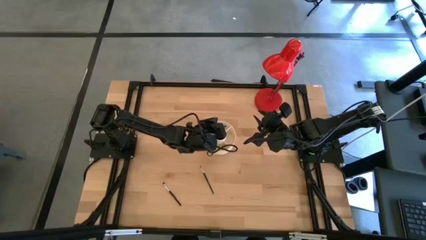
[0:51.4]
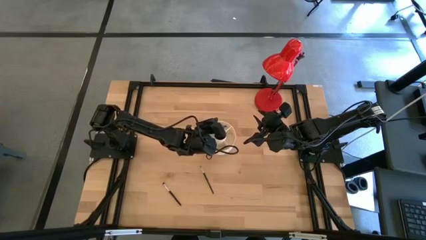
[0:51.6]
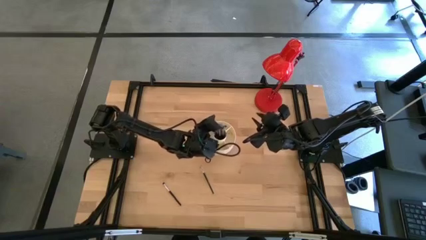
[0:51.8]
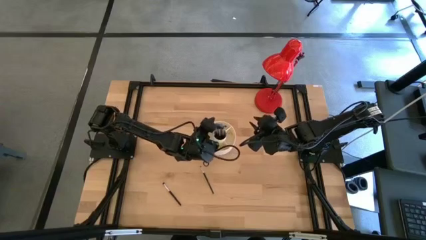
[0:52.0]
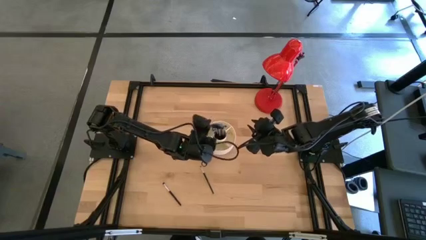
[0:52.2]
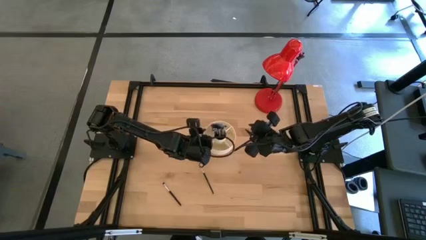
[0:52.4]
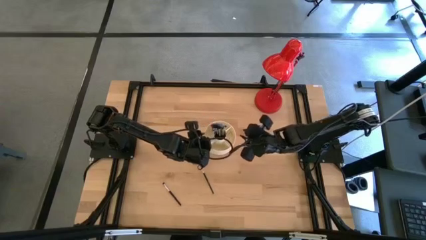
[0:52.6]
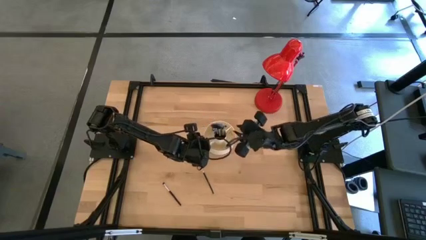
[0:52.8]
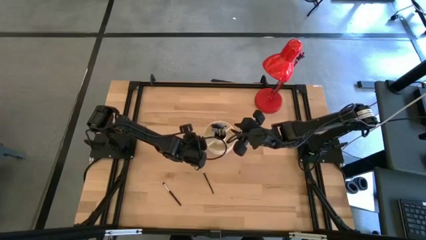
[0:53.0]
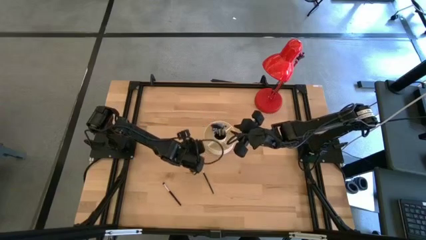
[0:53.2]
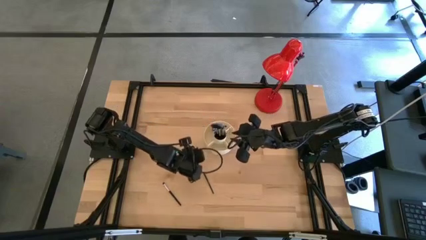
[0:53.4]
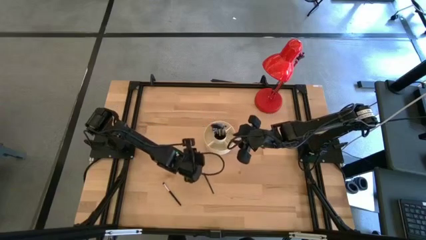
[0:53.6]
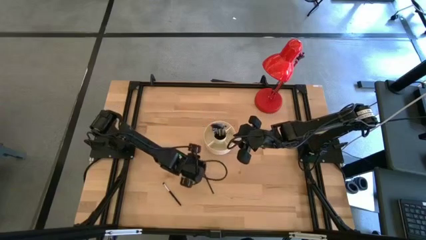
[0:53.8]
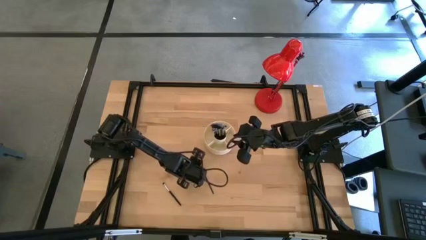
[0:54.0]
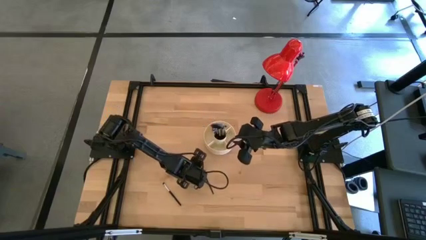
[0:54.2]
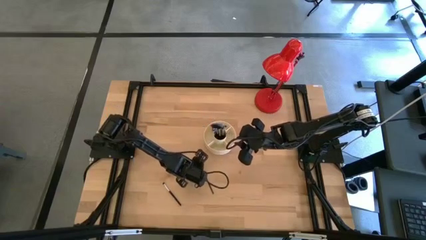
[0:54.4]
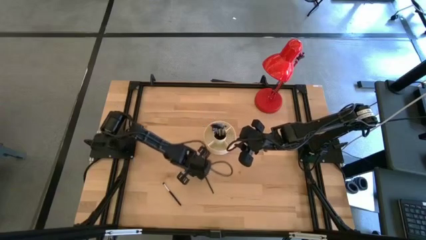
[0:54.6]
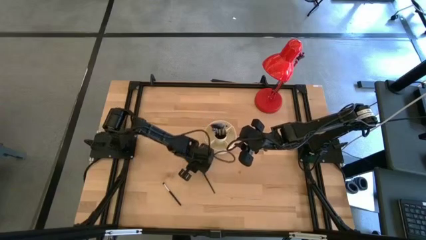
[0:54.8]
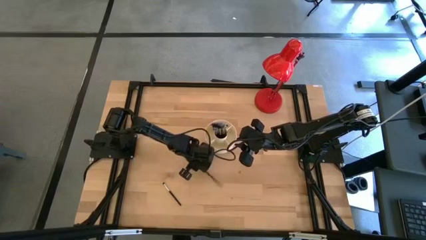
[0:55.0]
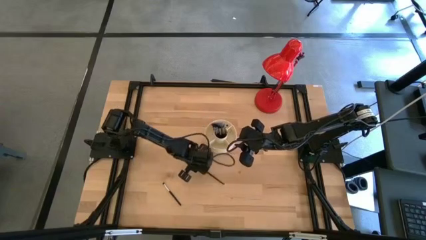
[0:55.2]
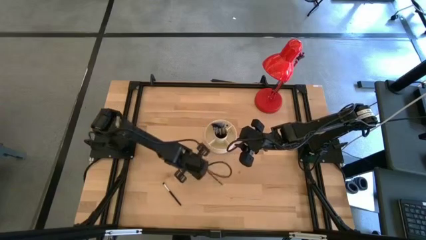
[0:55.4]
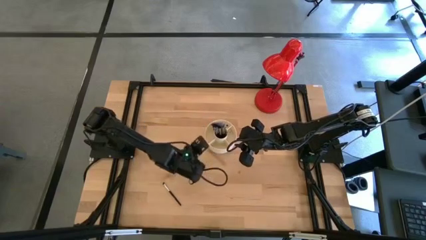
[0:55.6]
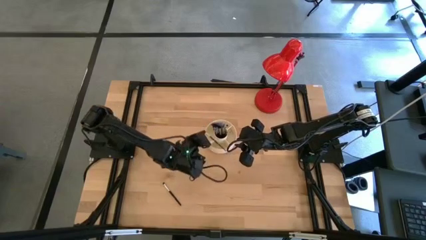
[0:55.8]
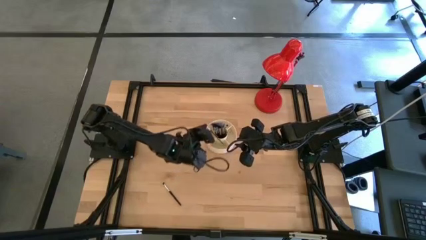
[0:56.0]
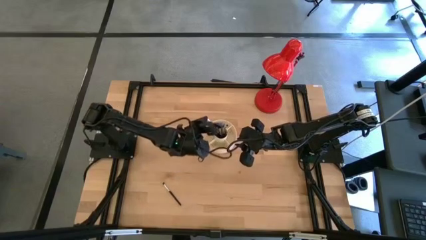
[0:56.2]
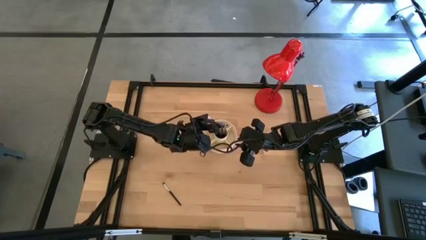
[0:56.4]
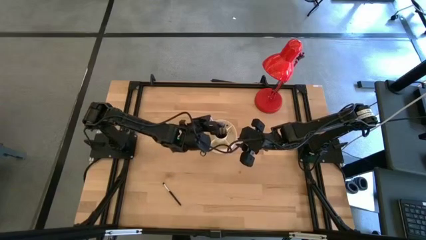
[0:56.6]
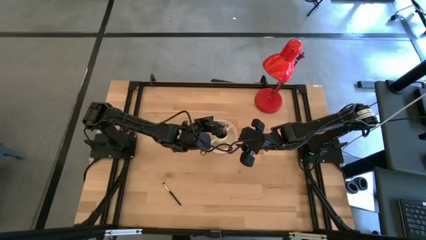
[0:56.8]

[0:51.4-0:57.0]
Task: Put items in baskets/containers
Put the eyeshadow brush into the brush organizer

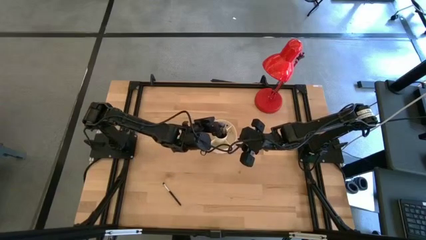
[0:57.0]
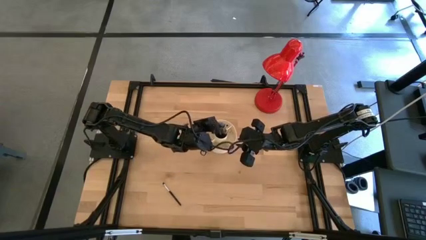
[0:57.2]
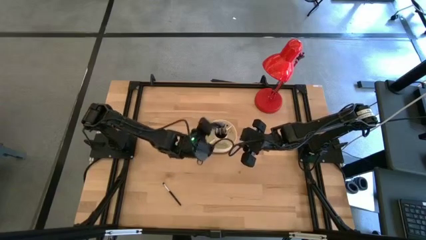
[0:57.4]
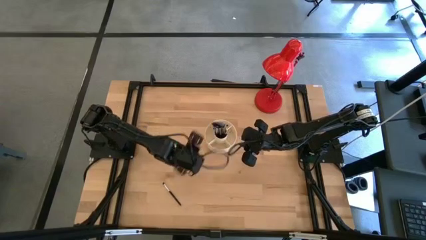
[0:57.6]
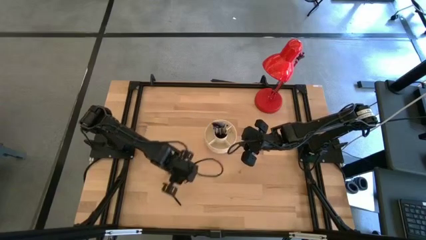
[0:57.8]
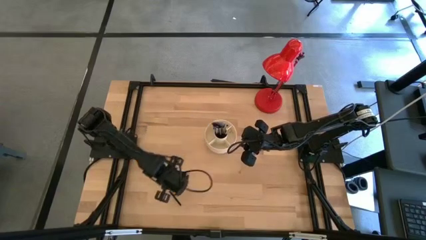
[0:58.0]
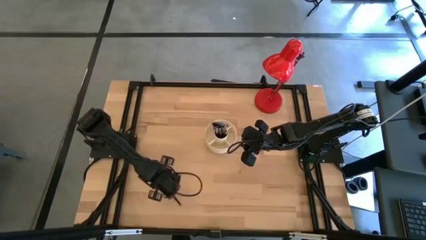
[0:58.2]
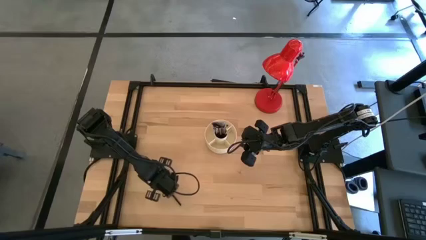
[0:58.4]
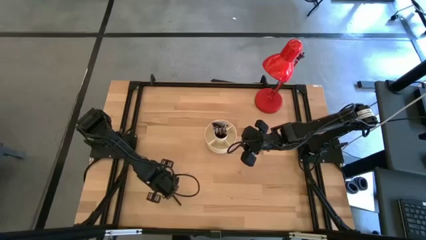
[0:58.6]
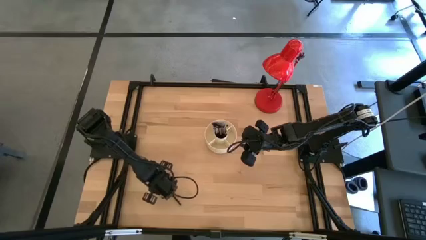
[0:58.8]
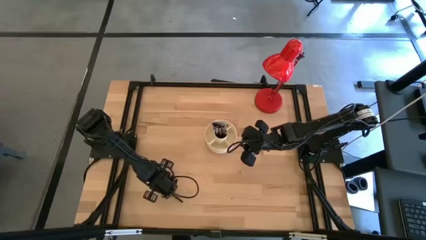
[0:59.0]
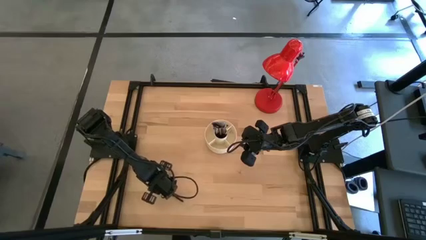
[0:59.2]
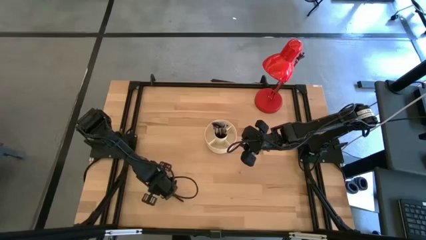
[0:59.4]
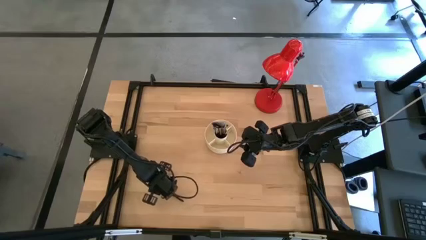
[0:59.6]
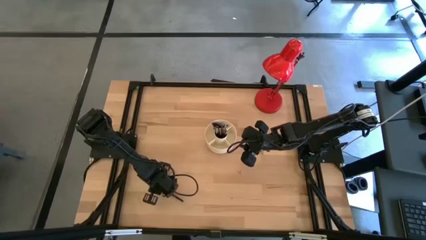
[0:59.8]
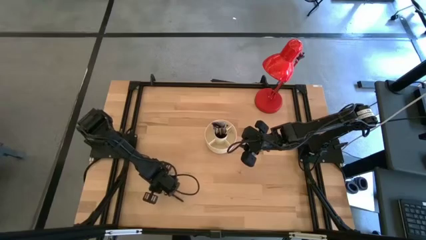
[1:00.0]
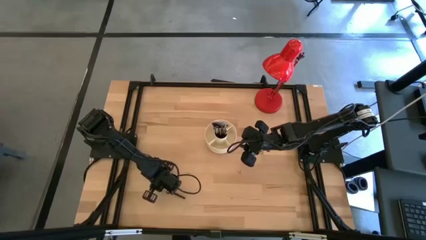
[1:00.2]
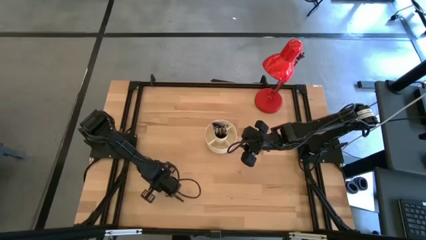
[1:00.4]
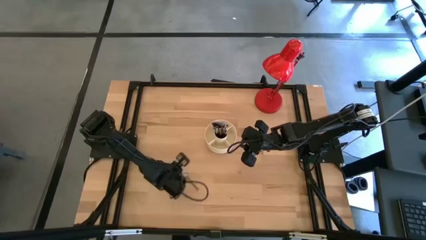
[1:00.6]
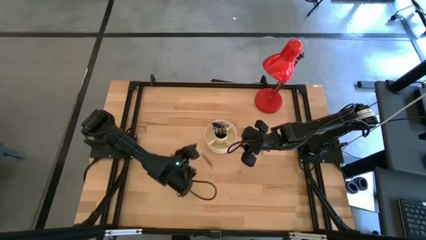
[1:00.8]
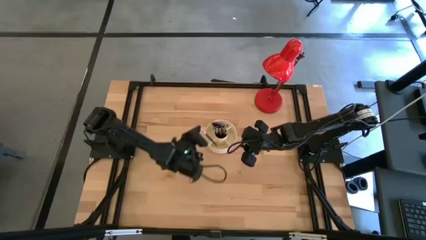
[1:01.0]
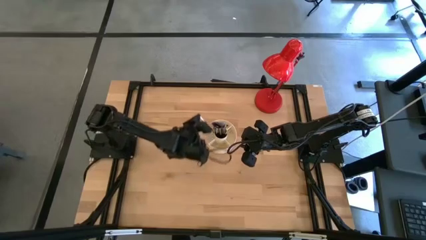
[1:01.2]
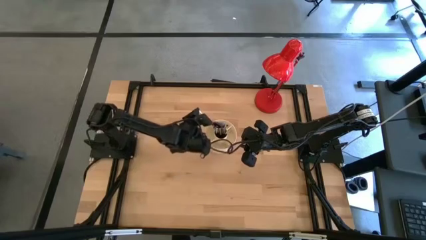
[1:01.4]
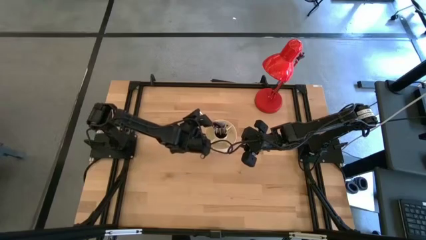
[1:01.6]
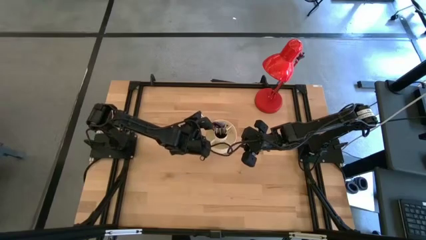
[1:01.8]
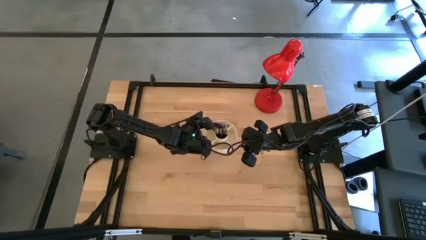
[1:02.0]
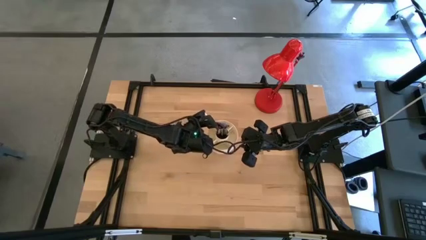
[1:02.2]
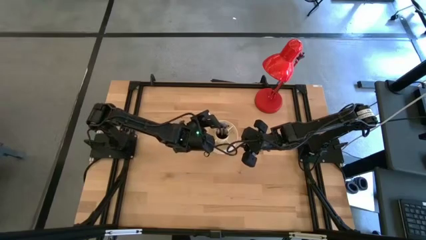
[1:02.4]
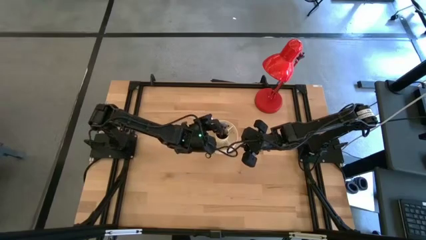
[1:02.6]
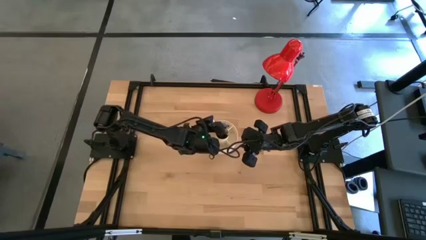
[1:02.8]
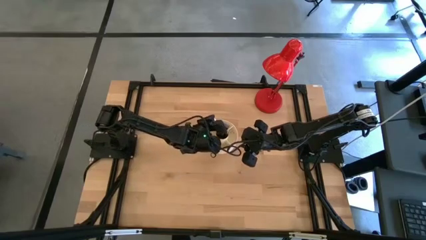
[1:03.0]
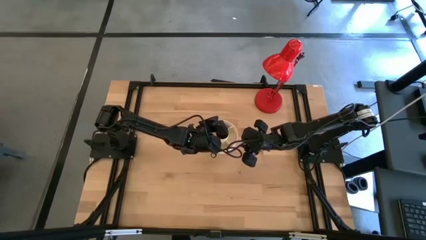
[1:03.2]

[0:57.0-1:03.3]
Put the eyeshadow brush into the brush organizer

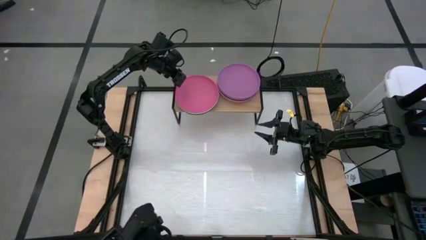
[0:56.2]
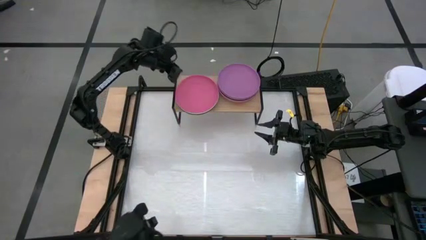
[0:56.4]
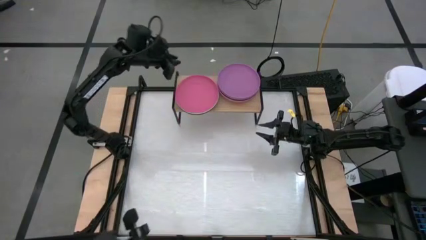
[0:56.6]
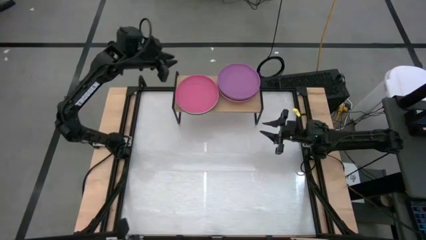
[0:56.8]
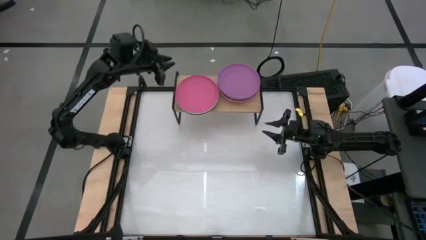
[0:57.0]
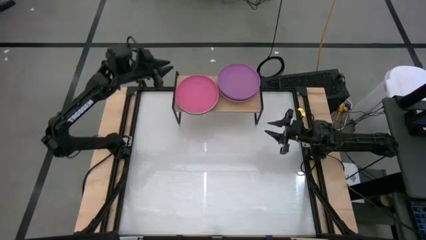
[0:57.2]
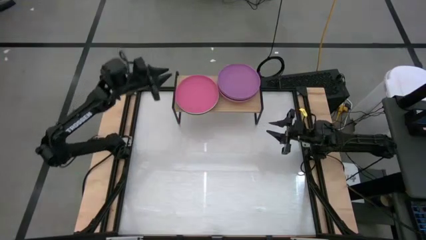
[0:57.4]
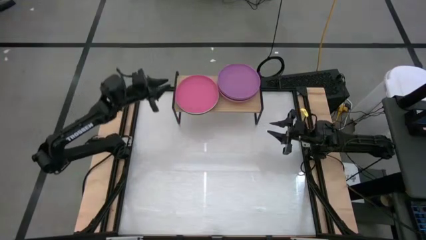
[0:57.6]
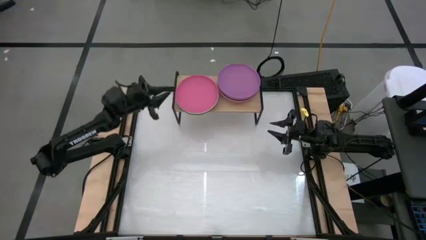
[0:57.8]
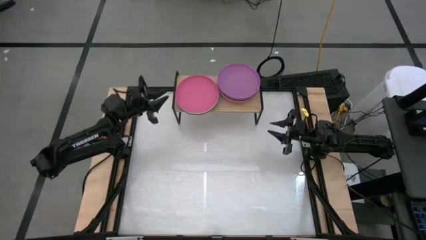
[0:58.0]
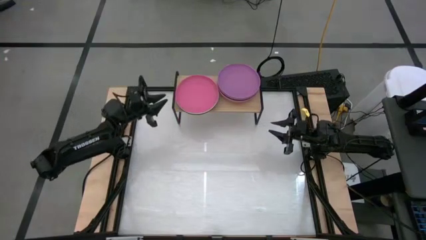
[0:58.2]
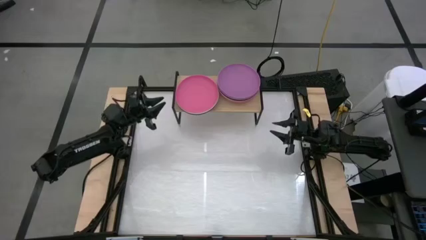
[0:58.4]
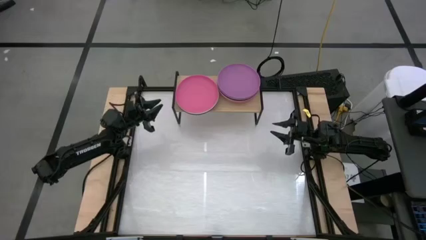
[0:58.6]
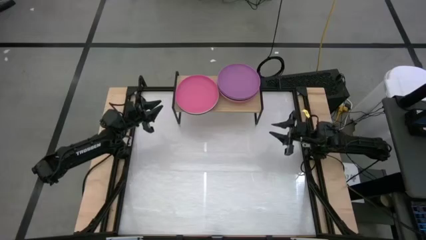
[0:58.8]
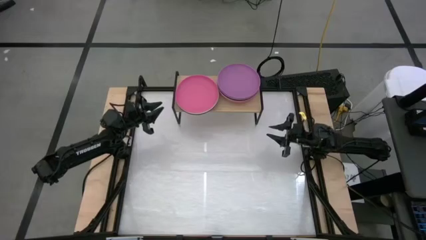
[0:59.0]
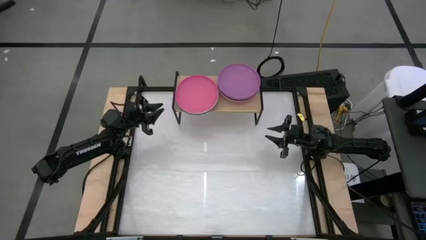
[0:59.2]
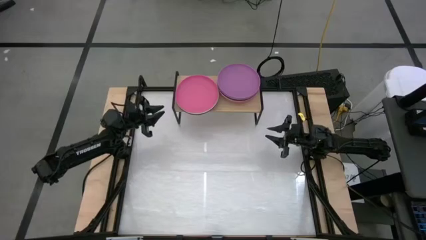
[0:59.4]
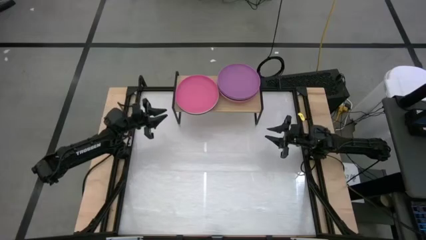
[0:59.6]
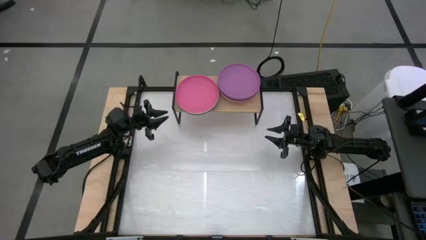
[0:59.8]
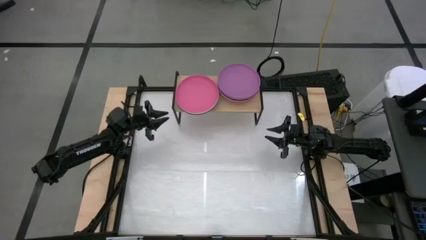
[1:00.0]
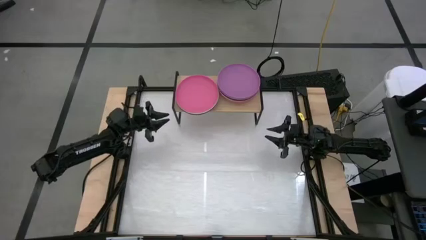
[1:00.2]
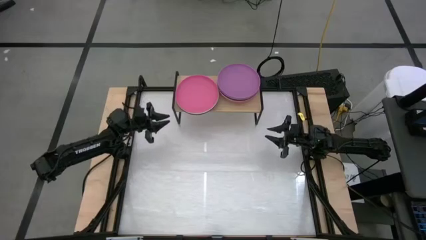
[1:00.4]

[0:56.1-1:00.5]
Task: Place and stack plates onto a shelf
Return to Home Position

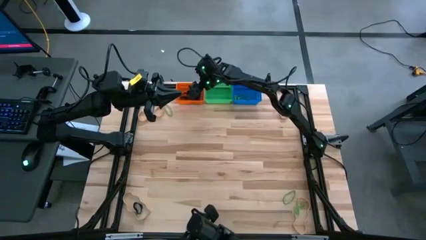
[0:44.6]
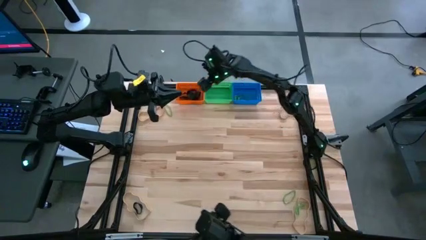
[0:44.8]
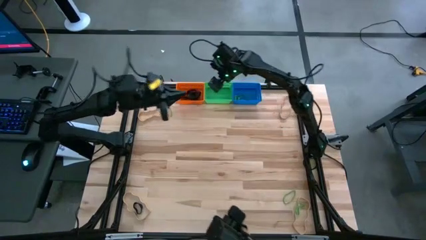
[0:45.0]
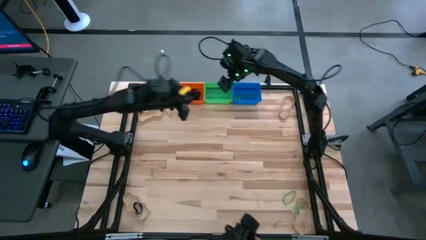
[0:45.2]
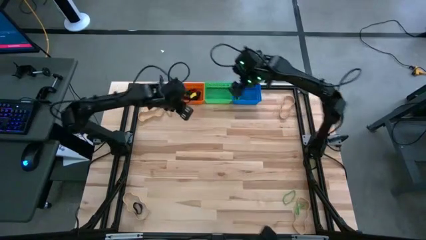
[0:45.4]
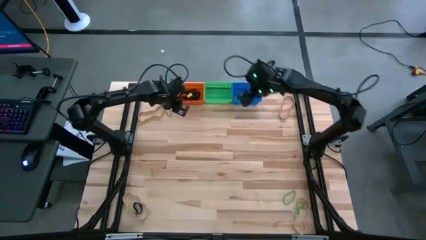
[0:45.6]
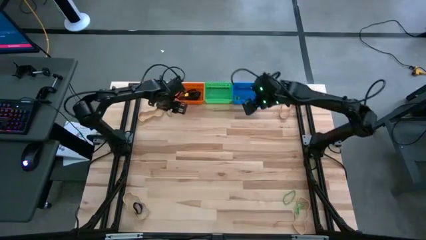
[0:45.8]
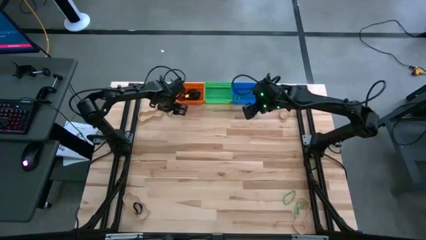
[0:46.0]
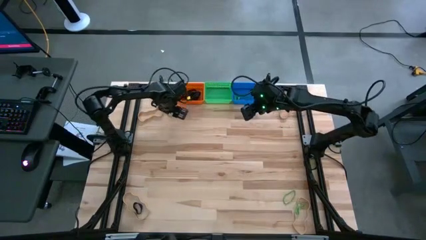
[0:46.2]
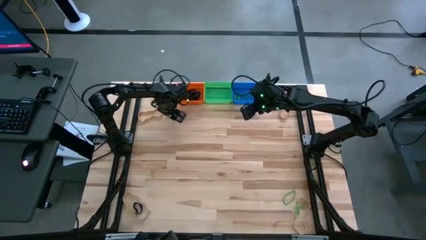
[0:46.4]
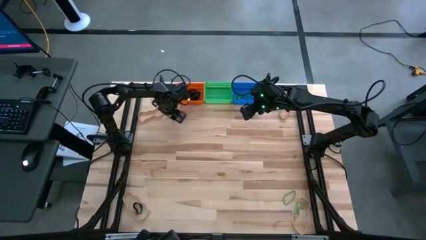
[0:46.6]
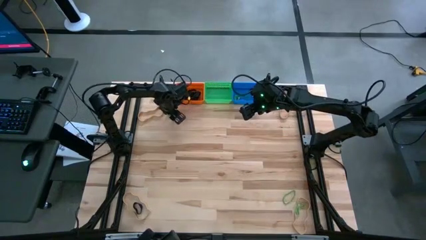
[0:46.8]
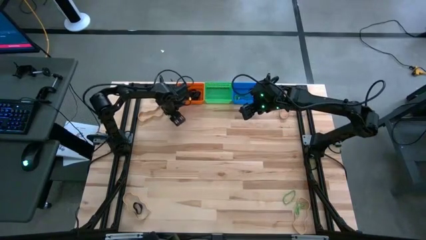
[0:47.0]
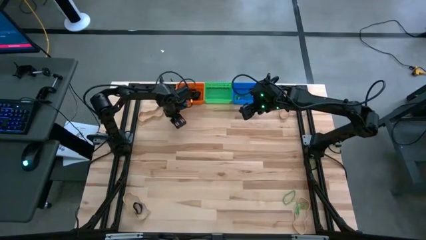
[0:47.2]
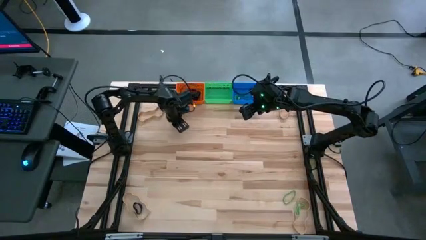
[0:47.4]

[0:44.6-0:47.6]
Task: Sort rubber bands into baskets
Put the green rubber band into the blue basket
